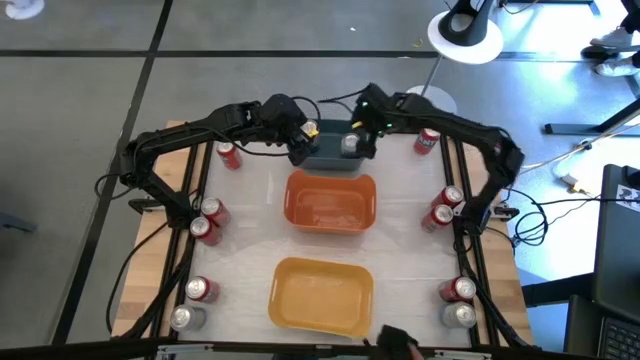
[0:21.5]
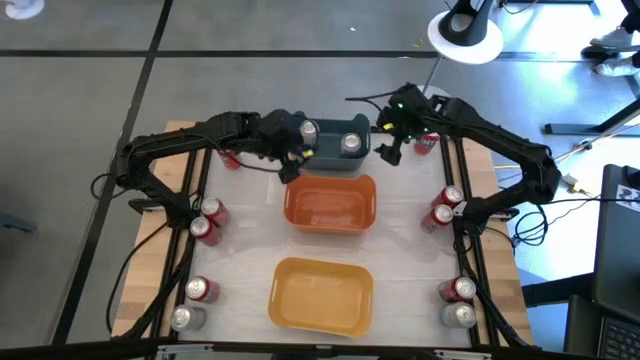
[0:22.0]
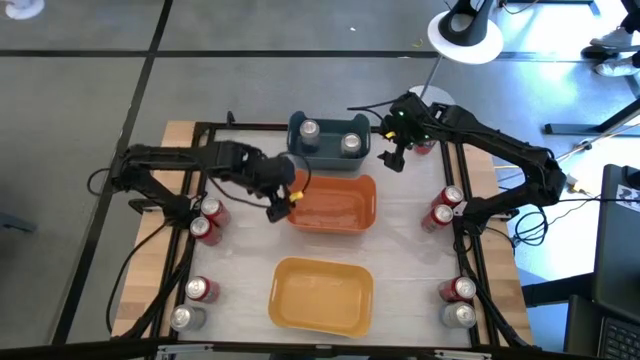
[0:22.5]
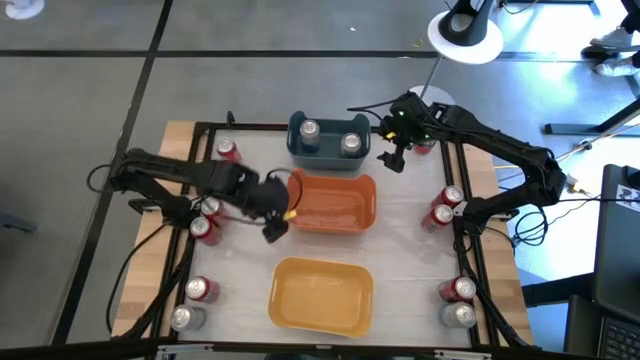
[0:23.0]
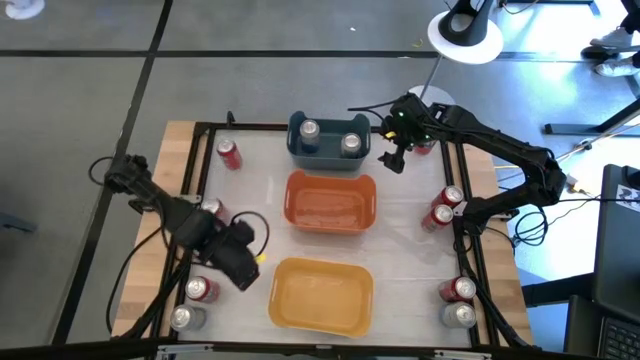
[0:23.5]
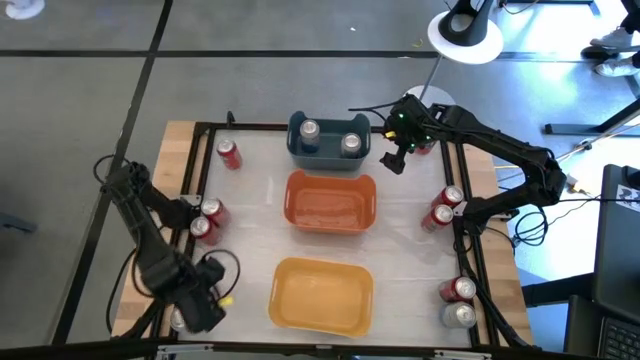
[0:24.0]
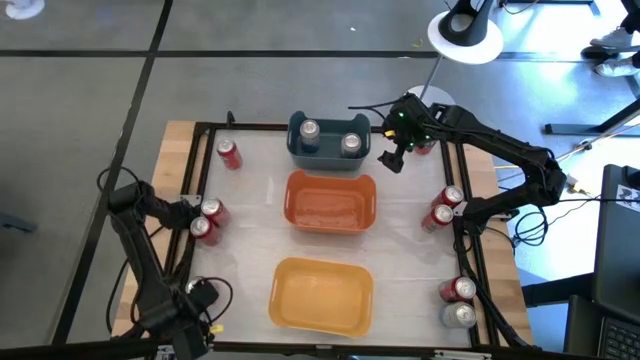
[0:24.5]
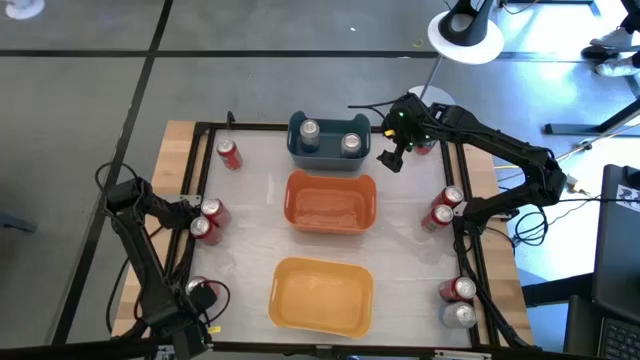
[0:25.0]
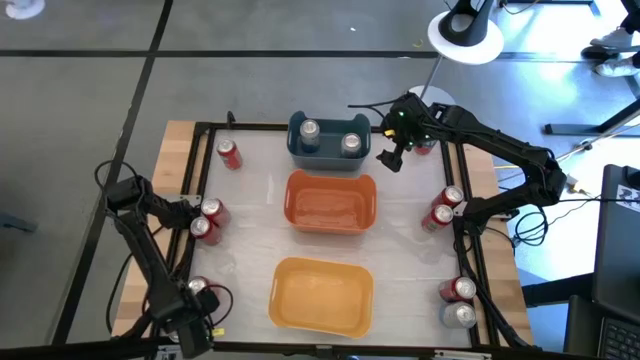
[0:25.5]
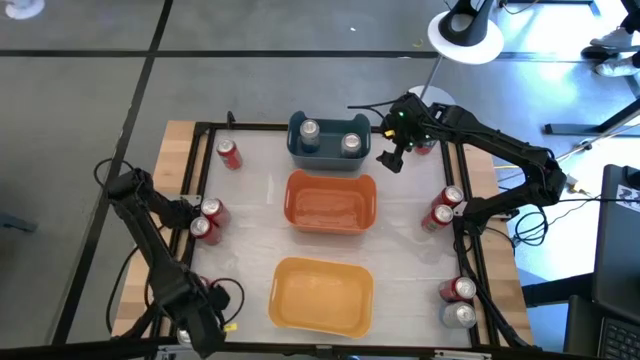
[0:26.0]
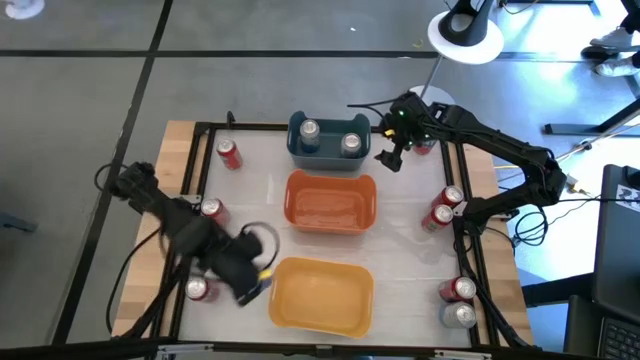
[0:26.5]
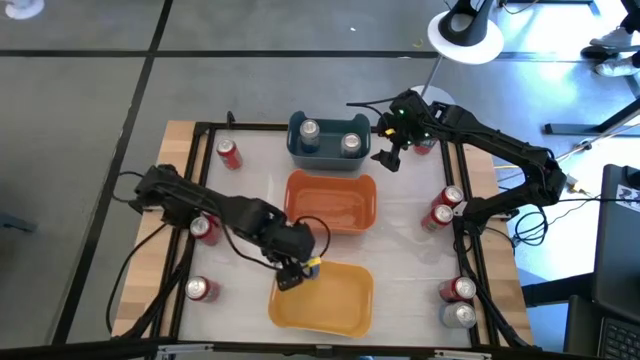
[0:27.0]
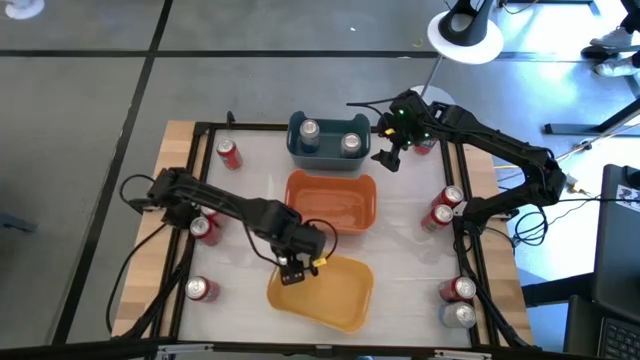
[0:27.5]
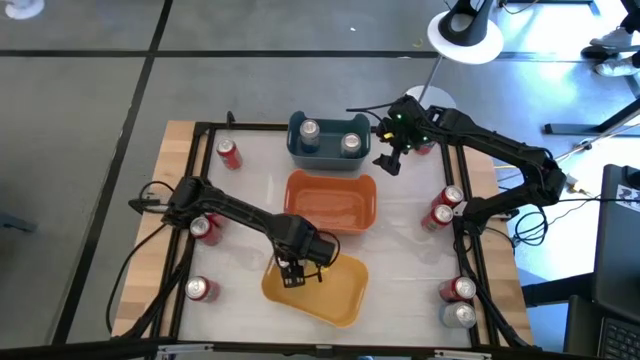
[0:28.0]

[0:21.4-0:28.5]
Task: Sort soda cans
Put the left blue soda can into the yellow bin

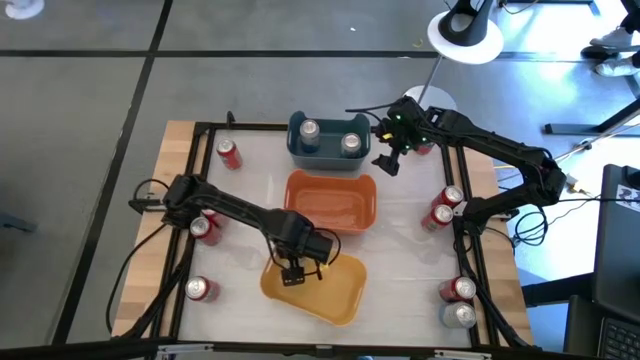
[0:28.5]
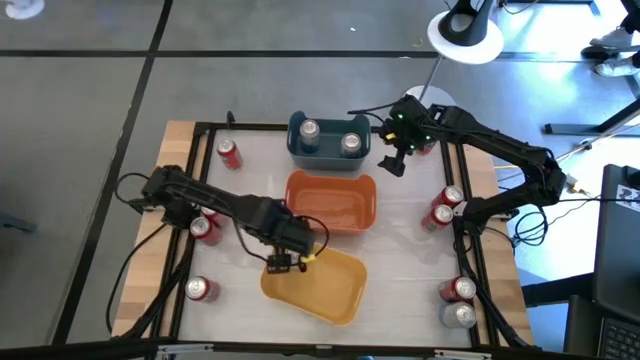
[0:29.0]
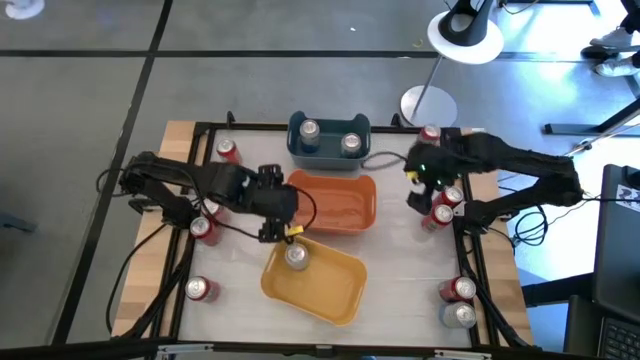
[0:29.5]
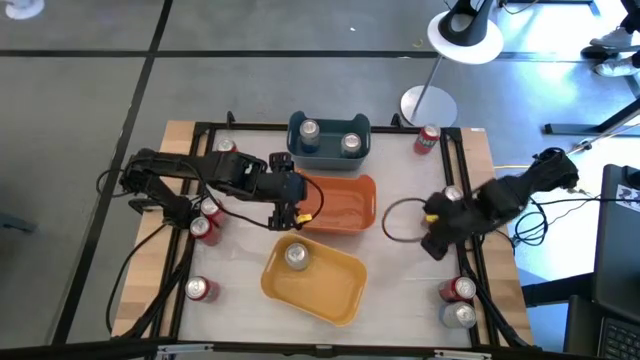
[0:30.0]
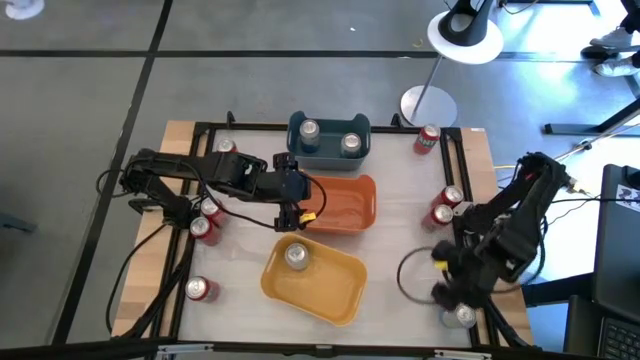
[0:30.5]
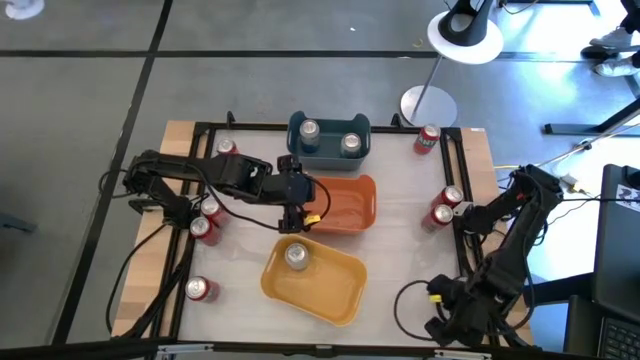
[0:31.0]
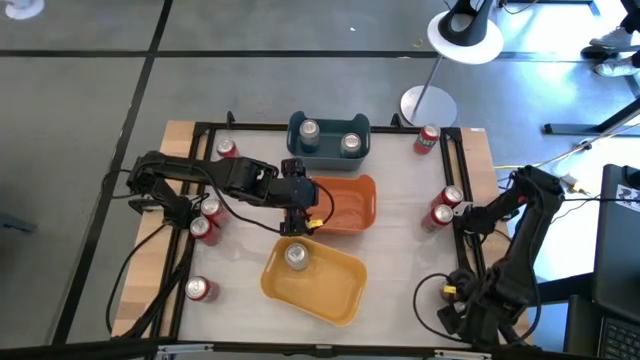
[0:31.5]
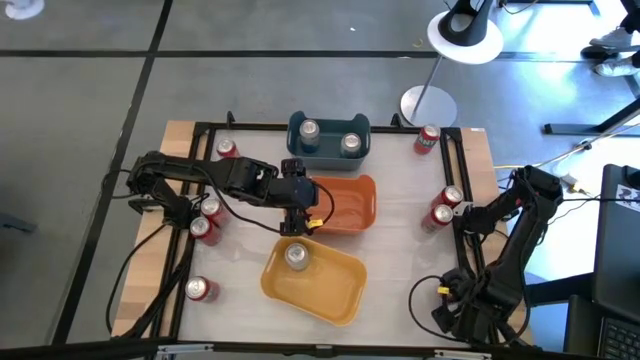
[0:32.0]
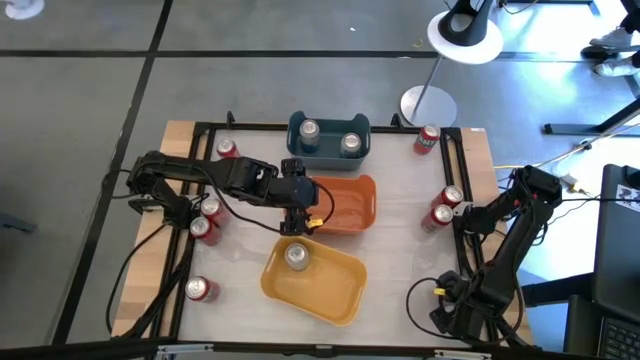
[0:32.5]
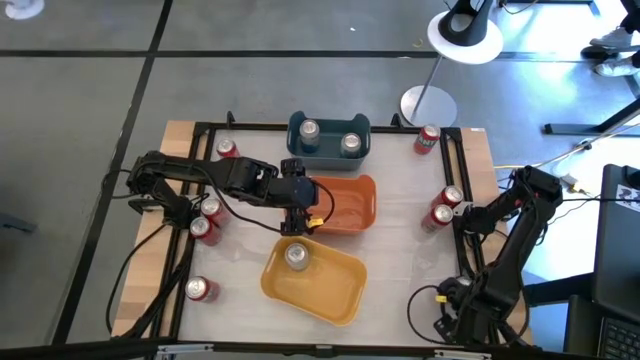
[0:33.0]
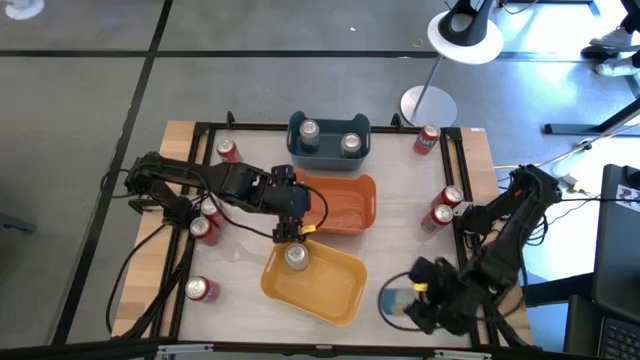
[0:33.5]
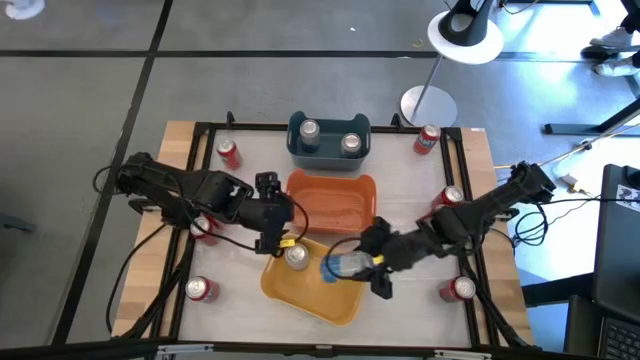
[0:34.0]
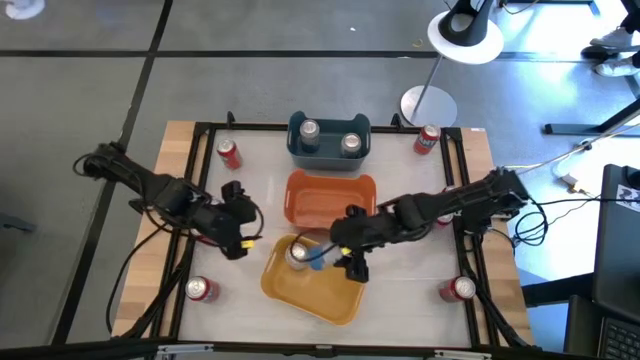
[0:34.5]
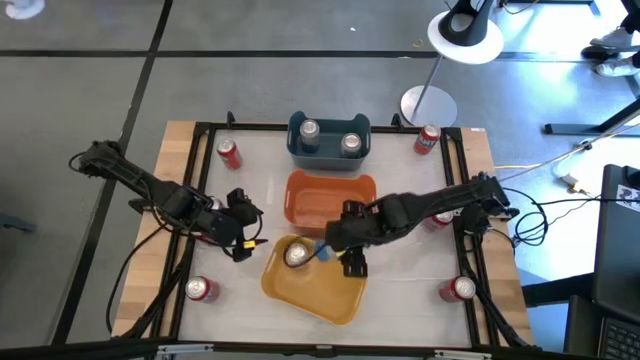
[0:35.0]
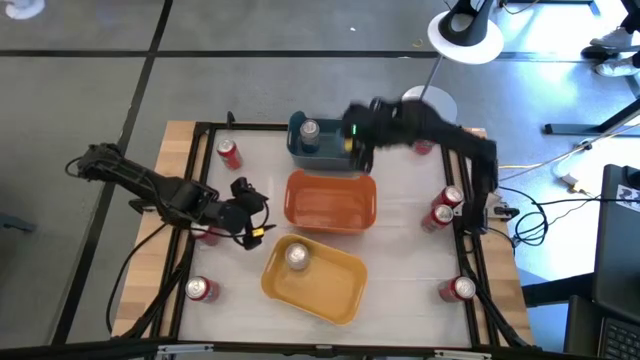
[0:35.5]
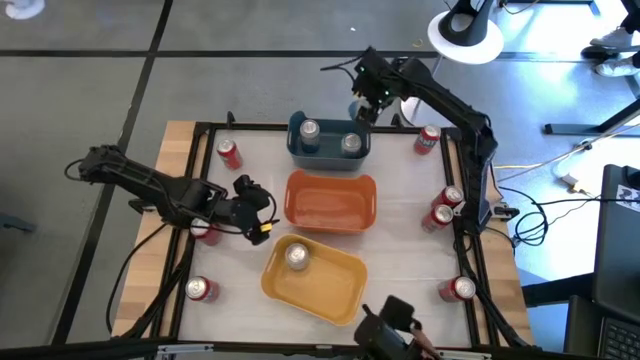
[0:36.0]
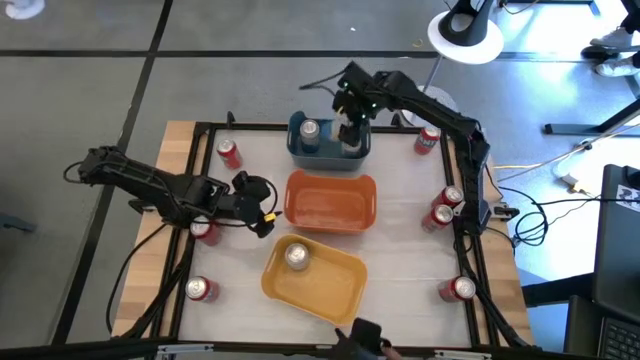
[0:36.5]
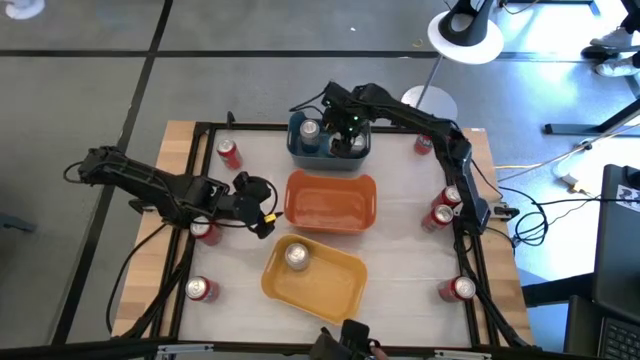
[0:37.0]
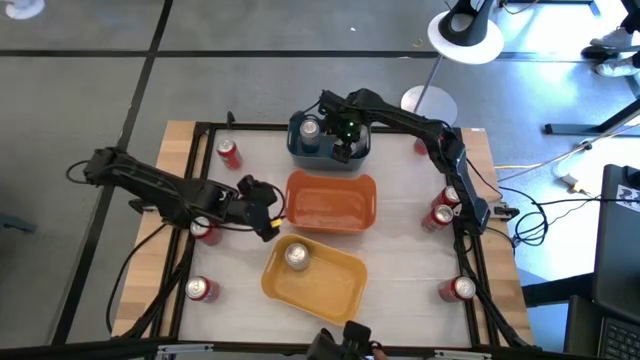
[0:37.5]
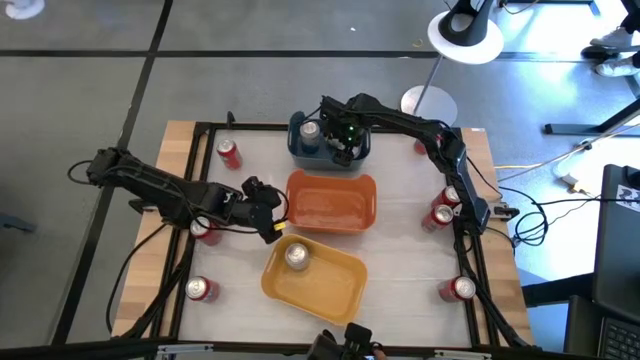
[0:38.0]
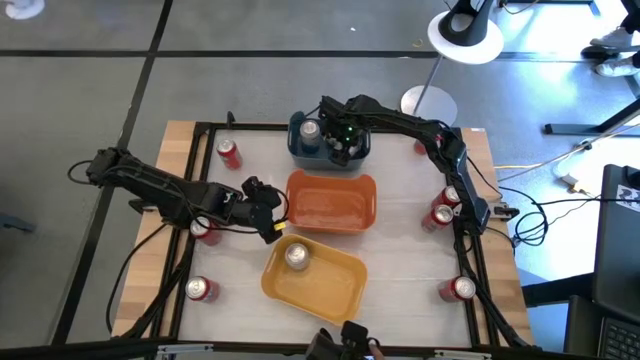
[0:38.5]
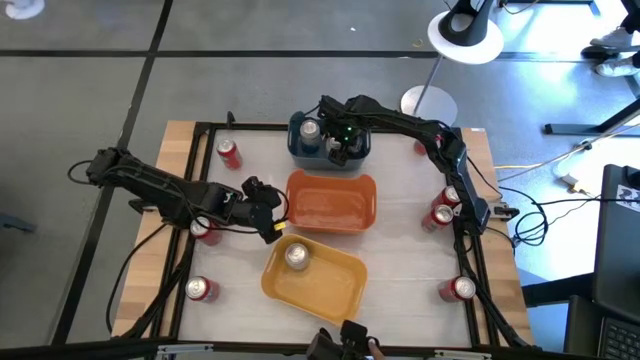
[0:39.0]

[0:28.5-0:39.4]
Put the blue soda can into the yellow bin

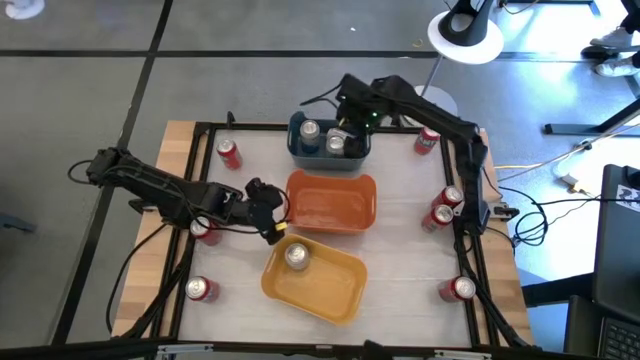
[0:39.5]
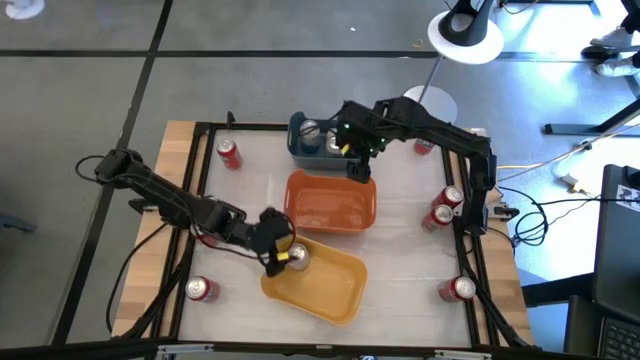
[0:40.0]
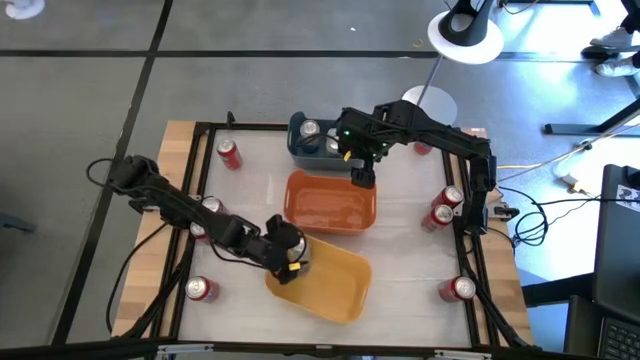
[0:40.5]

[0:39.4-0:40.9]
Put the blue soda can from the yellow bin into the dark blue bin
